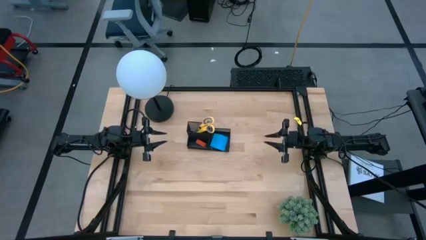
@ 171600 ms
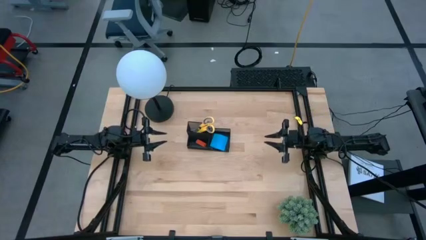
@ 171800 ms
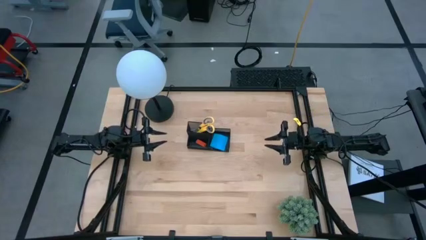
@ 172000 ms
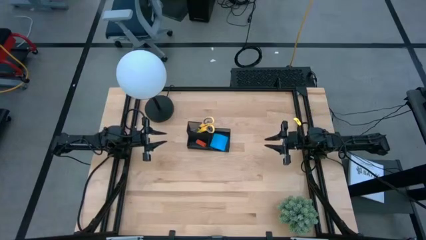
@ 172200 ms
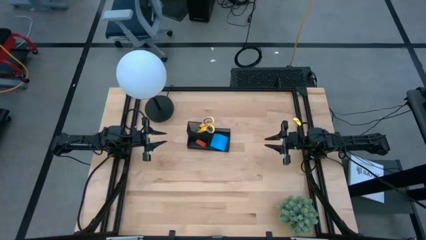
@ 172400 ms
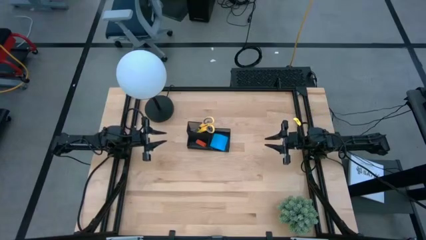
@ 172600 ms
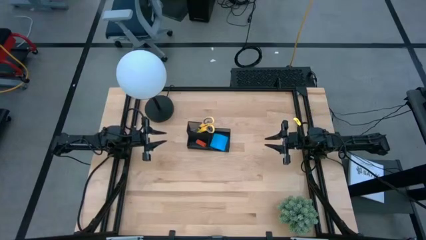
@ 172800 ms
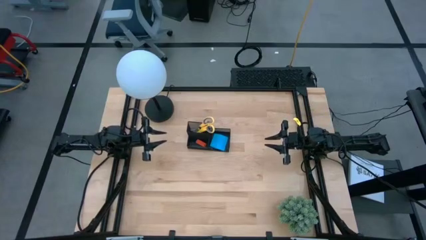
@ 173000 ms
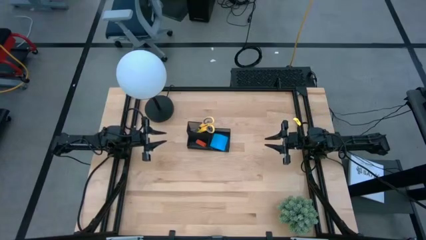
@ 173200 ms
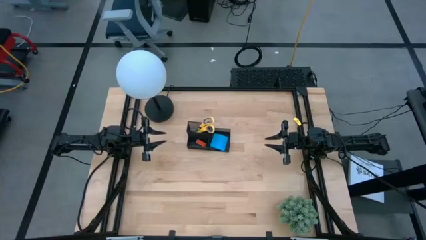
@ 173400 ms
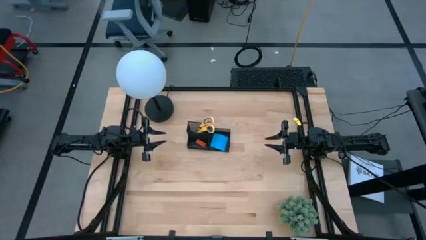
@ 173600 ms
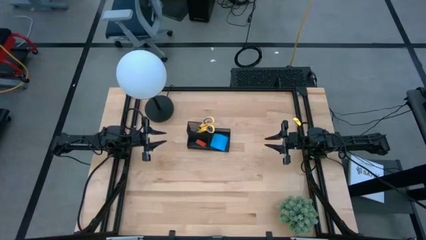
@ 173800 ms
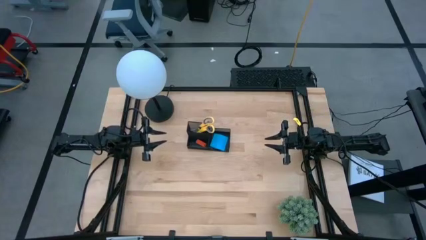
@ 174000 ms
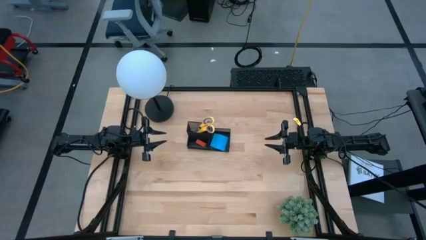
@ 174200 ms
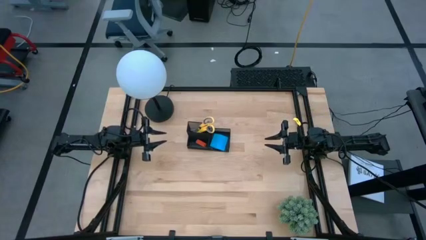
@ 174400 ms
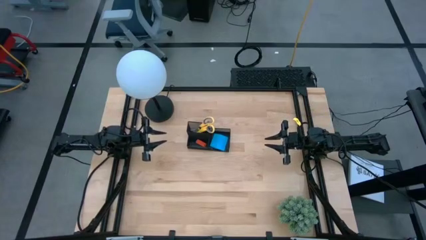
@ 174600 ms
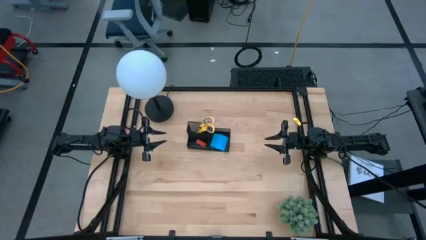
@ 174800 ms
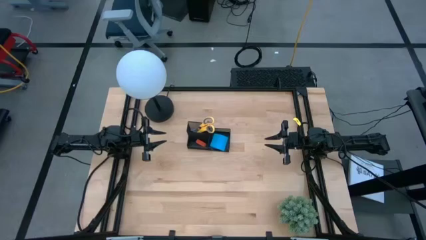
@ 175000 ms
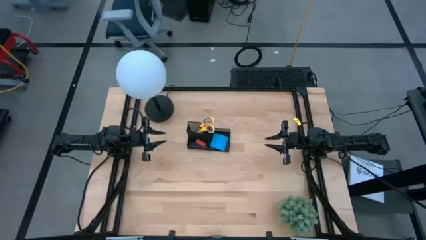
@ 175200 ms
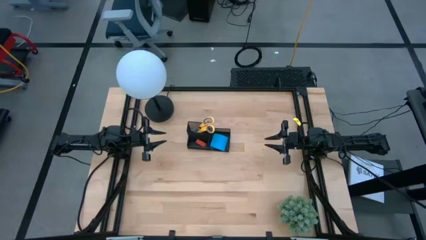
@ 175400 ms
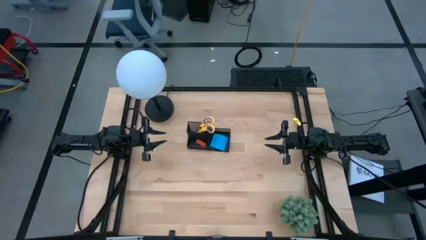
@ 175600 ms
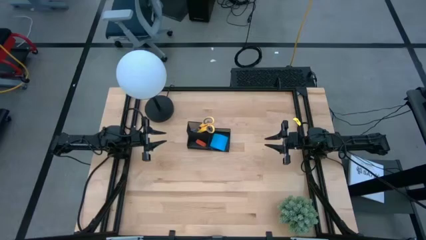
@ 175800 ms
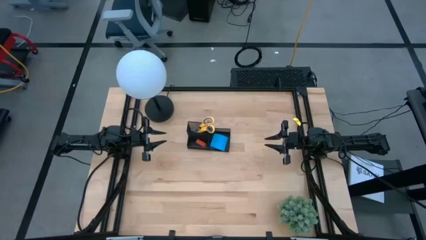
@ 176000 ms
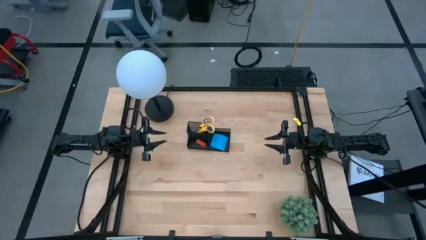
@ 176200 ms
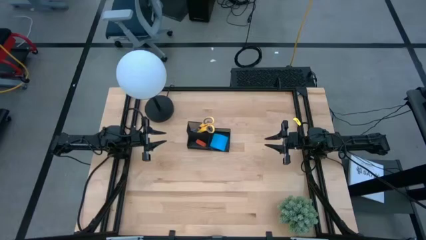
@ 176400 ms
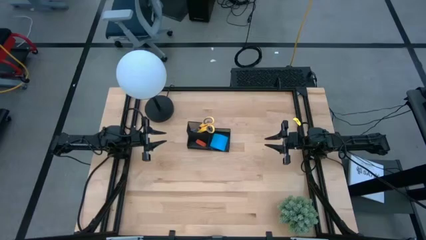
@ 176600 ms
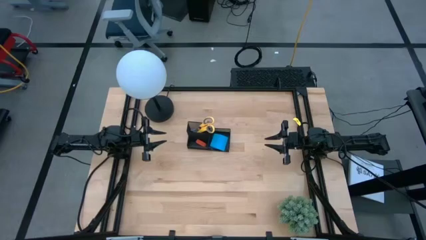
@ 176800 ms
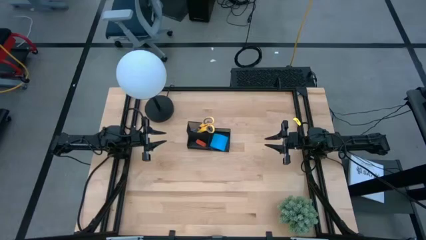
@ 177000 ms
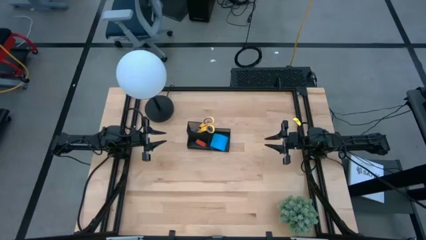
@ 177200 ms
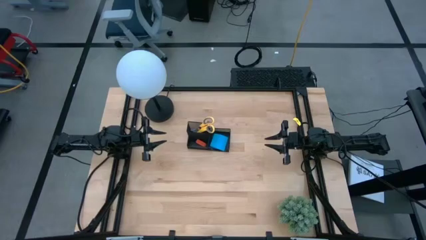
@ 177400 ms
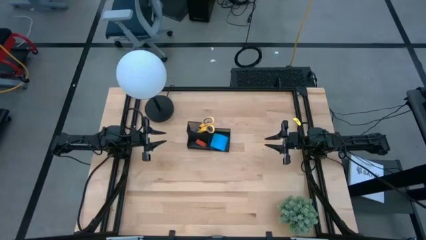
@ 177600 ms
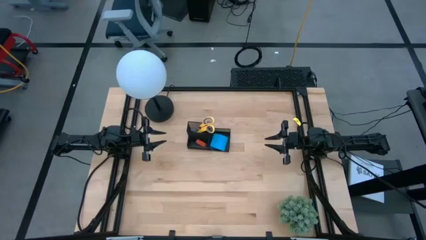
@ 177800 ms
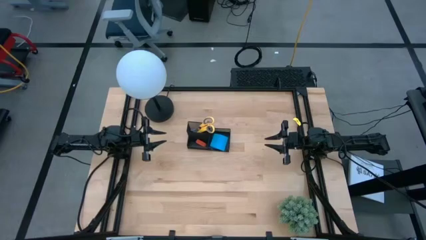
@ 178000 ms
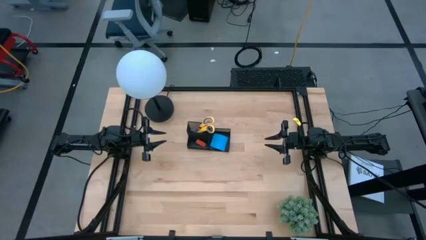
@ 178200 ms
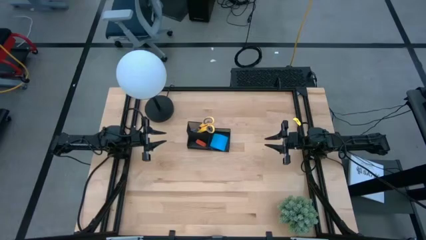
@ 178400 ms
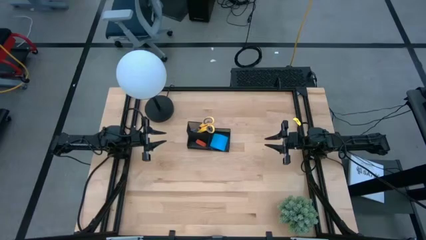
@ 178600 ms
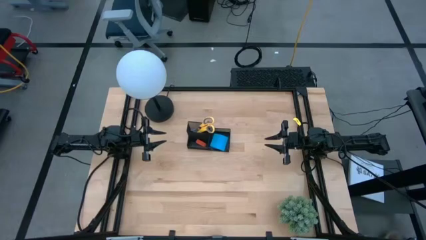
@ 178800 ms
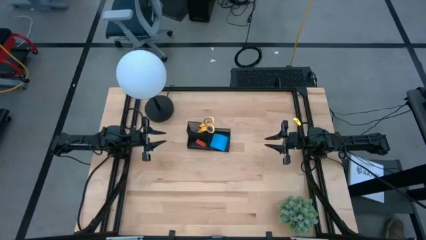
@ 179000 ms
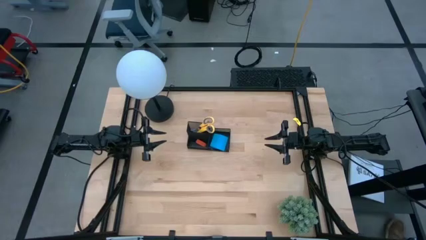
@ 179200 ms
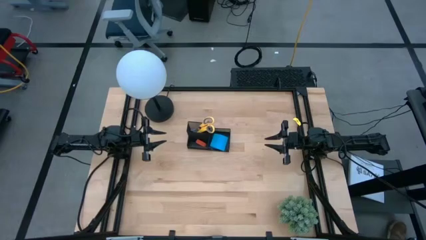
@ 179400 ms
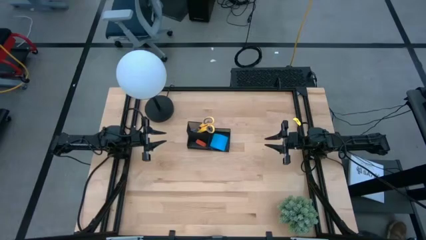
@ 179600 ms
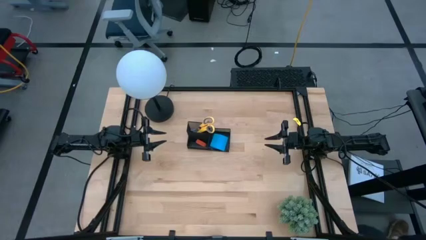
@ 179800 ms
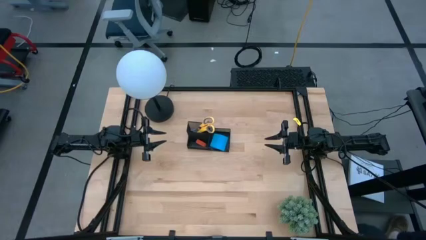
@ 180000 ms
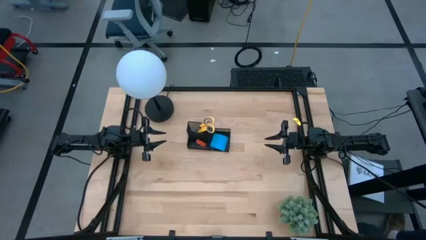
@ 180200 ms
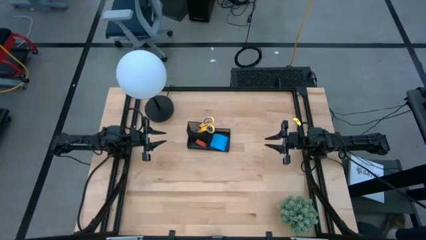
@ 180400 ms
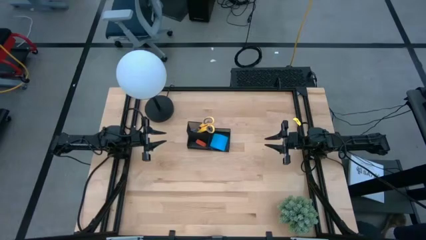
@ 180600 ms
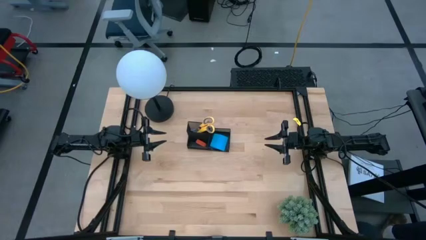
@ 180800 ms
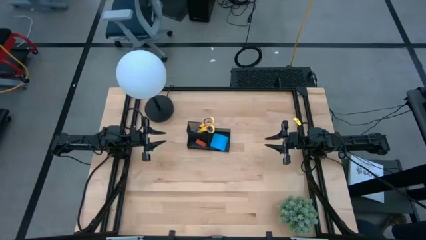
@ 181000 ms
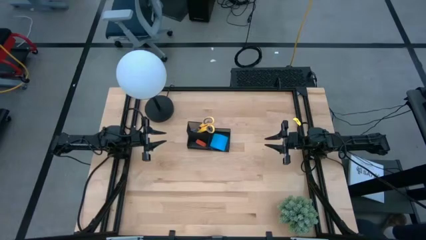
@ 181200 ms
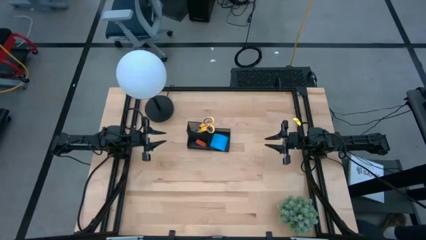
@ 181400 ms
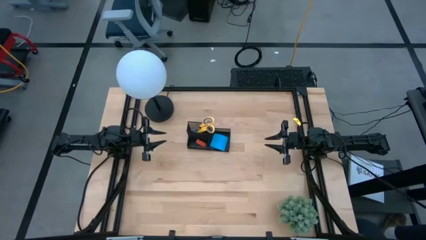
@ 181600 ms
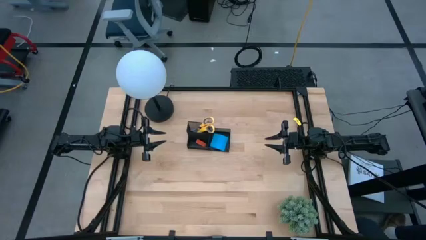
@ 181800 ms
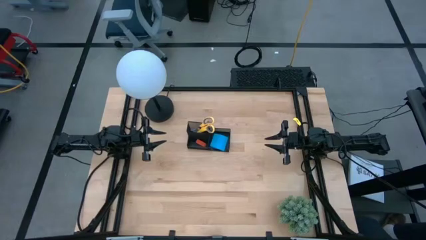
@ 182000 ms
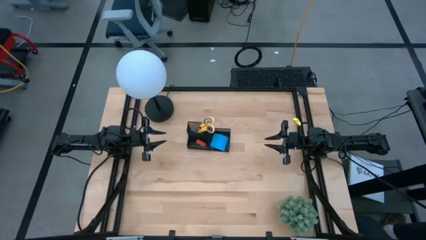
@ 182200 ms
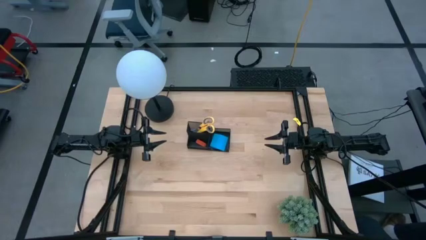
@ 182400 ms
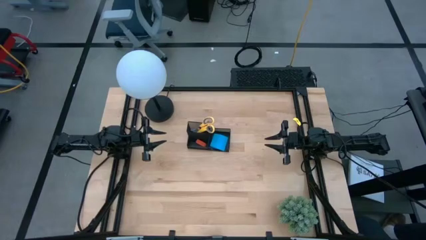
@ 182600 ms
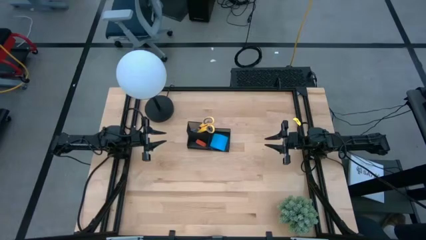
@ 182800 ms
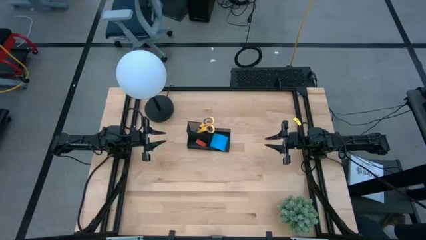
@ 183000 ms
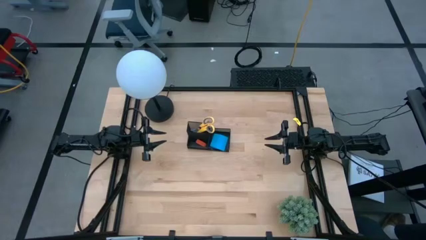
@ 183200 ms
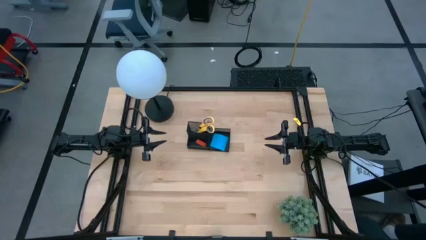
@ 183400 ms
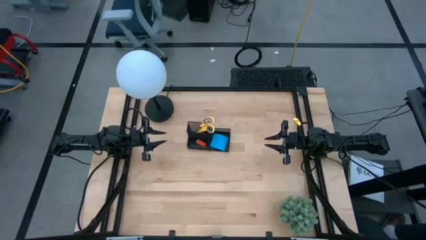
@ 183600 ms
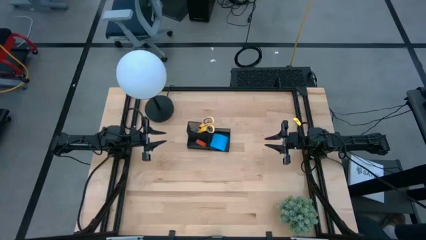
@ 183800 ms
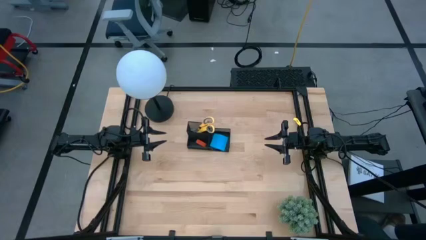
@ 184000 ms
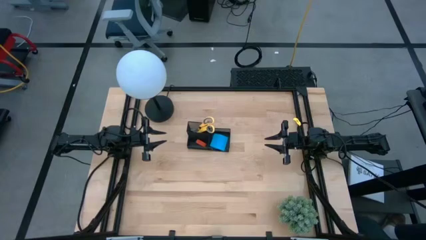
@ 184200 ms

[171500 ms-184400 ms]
Task: Pick and place office supplies into organizer
Return to Home Position
